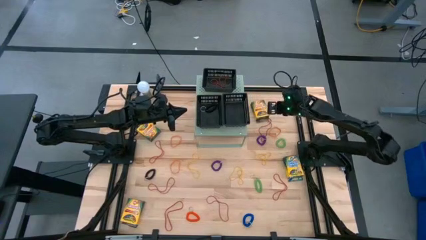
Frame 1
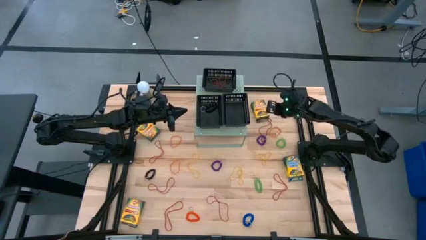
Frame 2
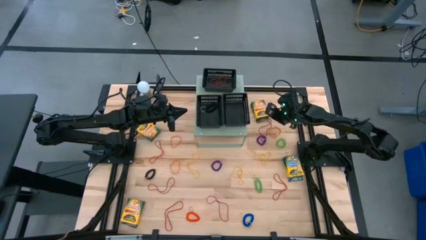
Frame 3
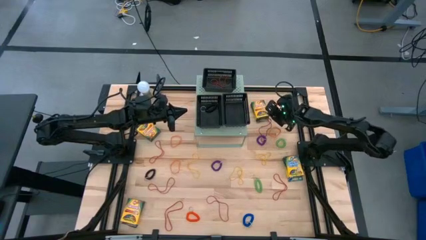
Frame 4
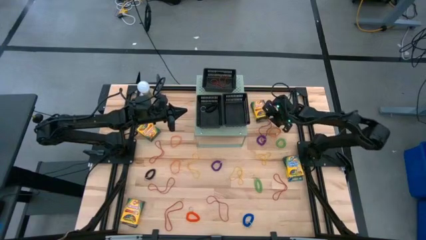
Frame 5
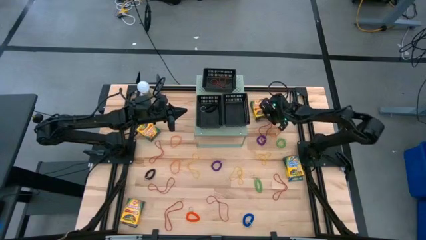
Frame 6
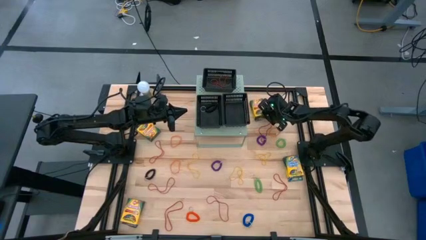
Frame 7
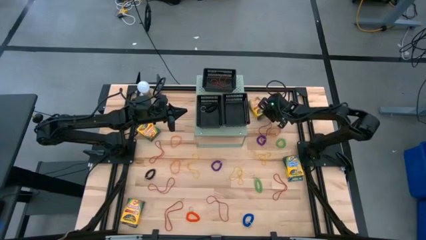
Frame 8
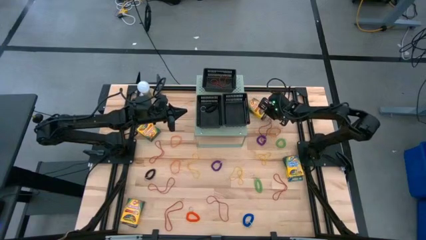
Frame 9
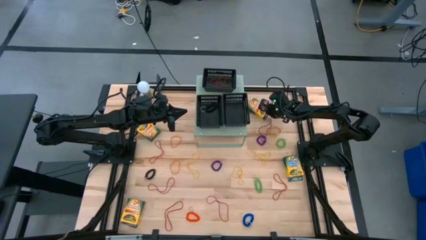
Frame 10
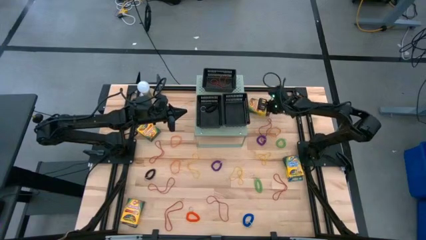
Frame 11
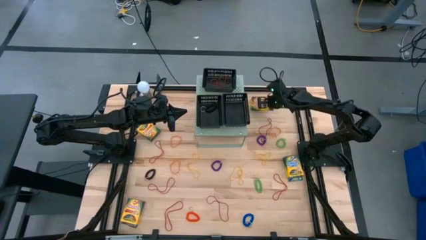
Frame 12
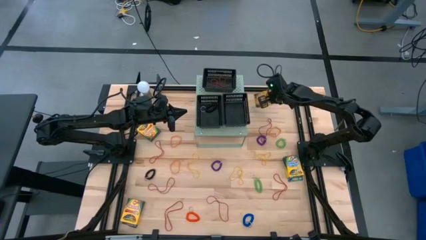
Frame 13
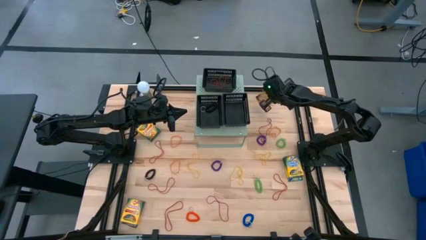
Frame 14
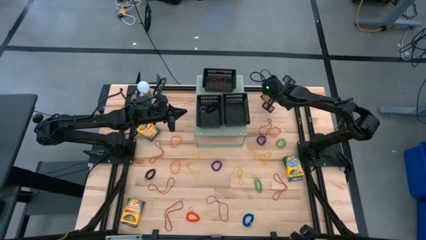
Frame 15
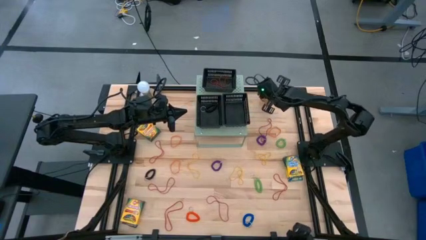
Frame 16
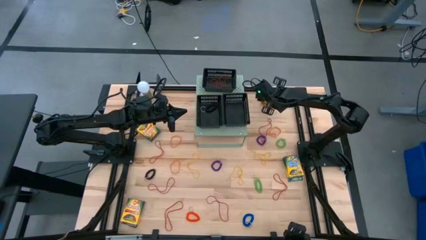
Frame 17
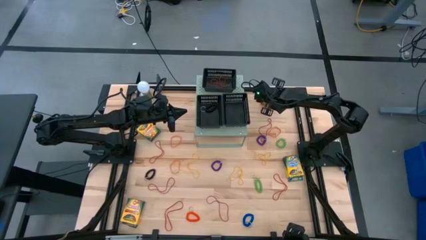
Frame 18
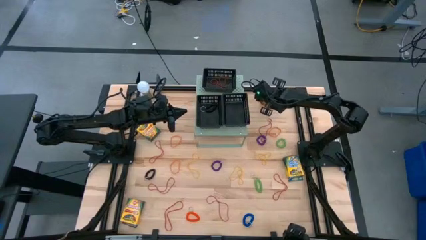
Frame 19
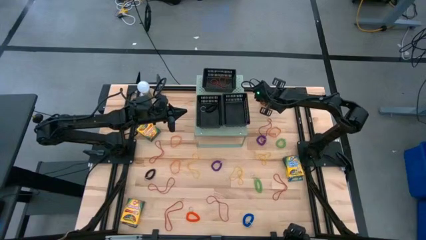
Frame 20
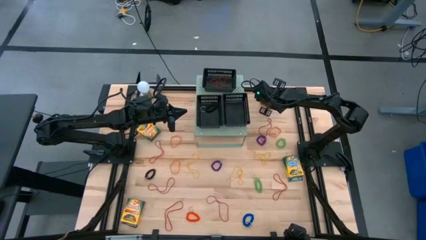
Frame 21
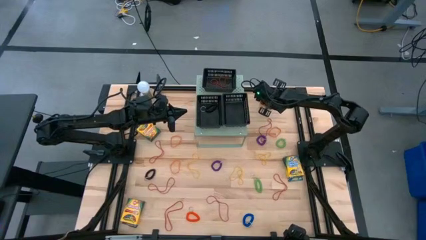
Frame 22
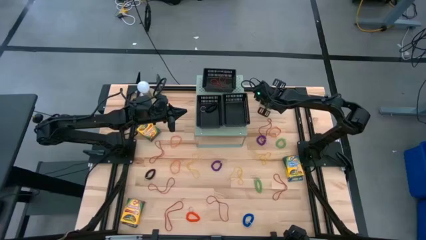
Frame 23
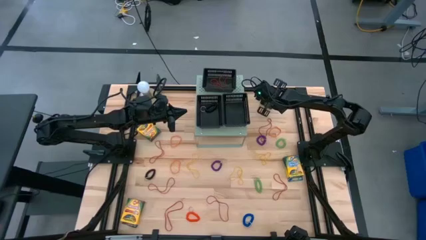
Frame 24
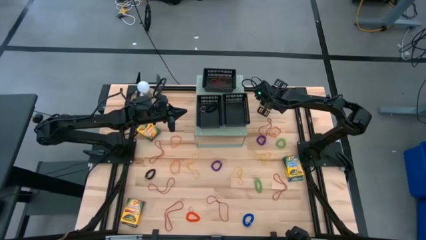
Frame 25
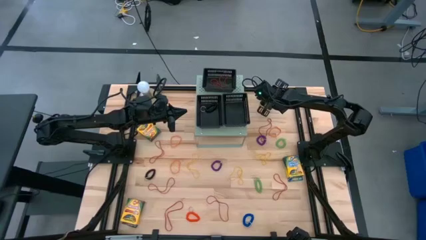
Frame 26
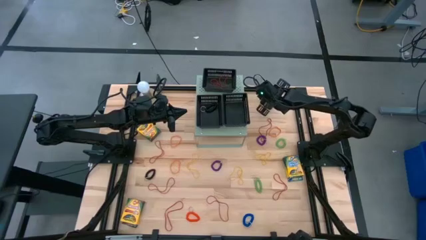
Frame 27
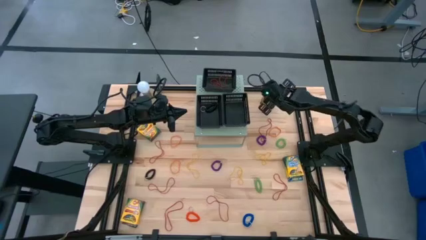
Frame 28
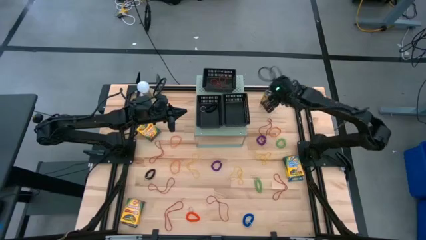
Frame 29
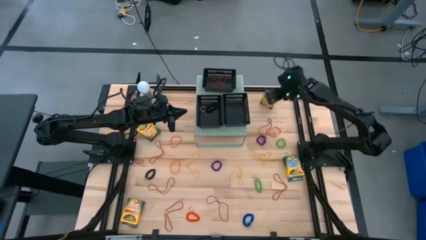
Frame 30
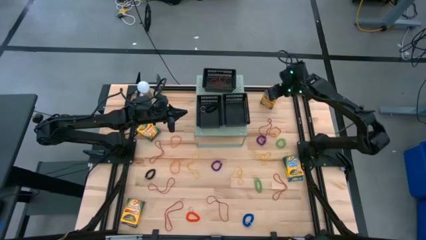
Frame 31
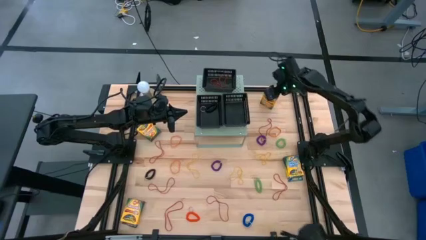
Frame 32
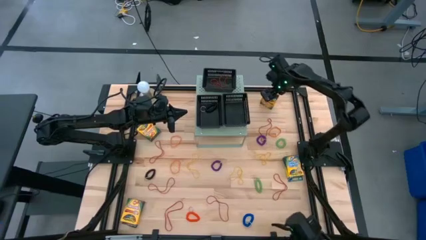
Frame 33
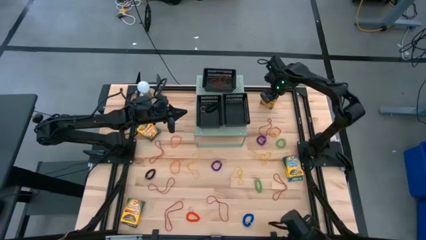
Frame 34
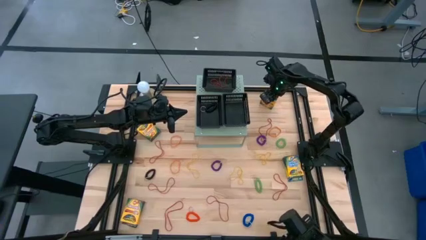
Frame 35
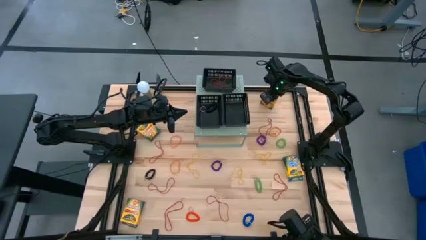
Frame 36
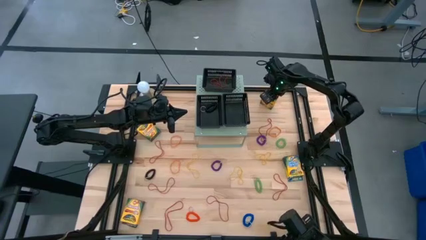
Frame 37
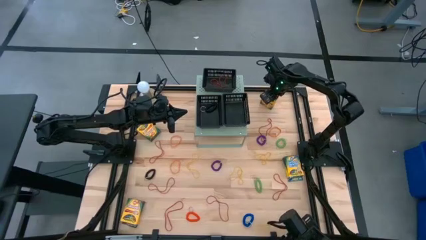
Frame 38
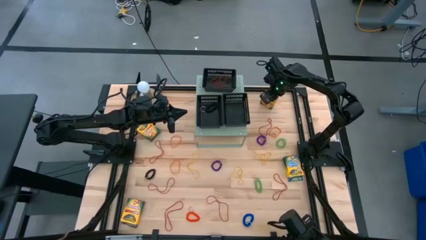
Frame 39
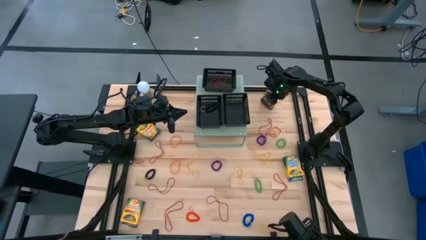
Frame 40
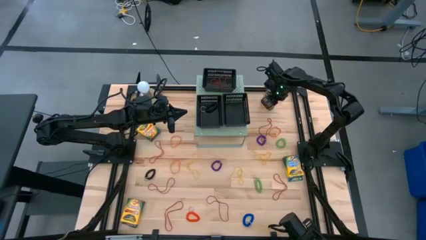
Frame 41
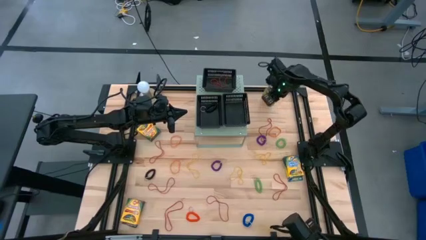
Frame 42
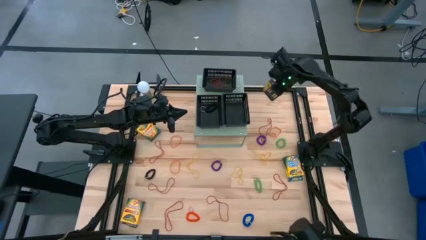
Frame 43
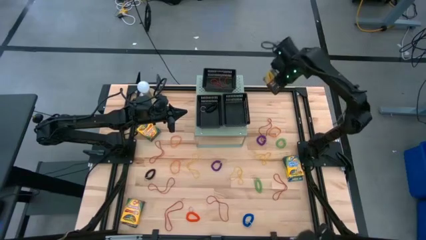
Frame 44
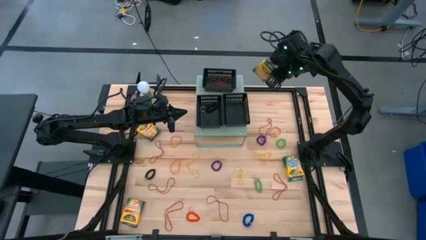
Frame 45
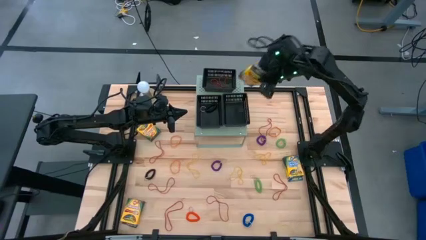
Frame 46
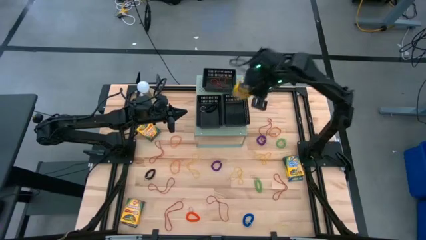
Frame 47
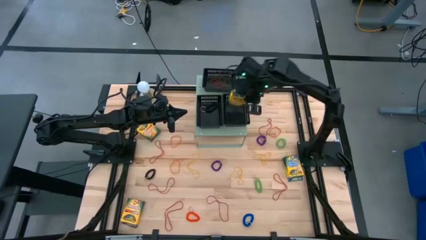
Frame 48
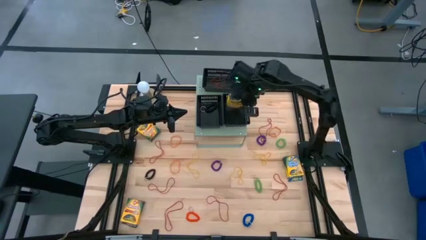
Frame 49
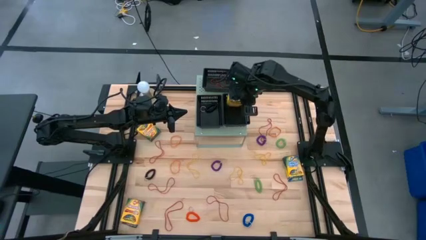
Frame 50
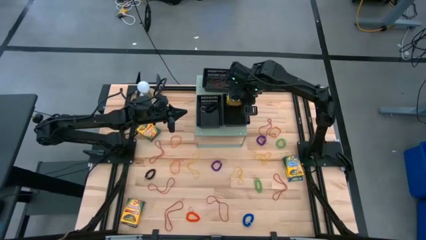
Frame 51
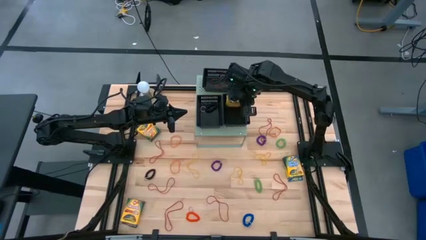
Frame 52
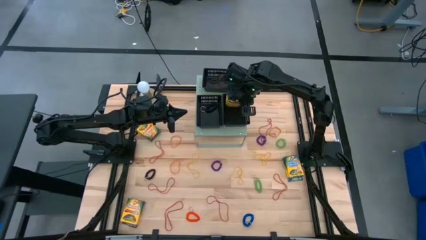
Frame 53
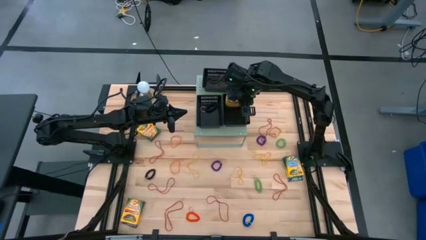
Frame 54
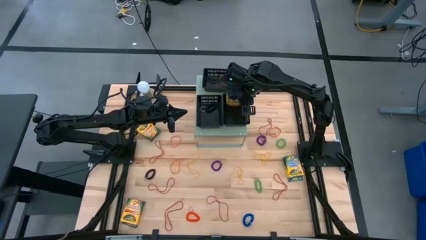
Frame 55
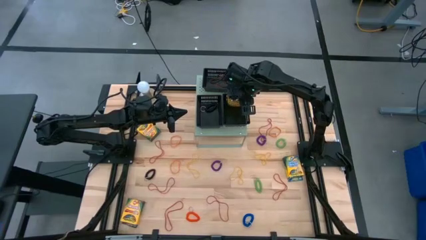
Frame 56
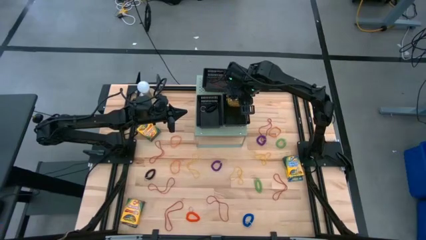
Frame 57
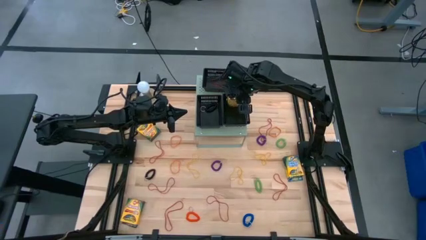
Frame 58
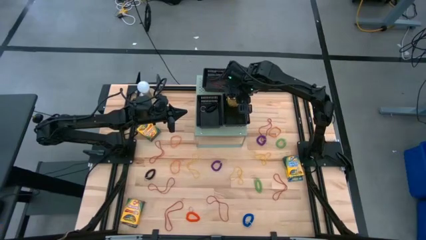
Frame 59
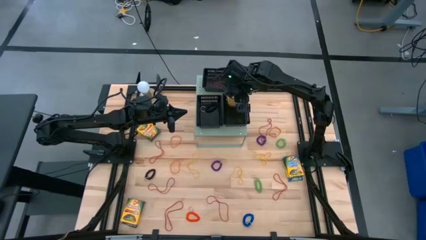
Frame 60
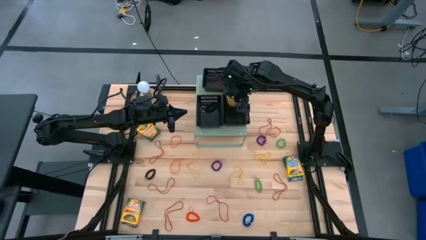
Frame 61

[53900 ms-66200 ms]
Task: Pick & Place Office Desk Supplies
Put the yellow crayon box into the bottom right black bin

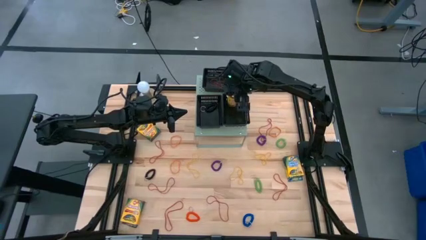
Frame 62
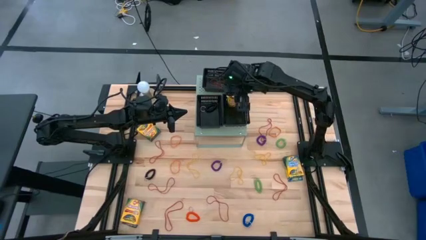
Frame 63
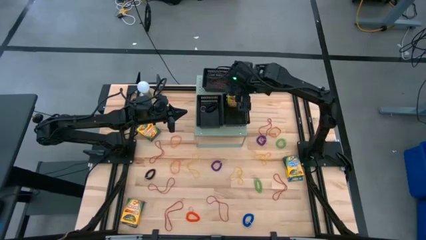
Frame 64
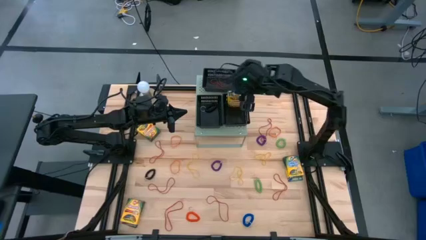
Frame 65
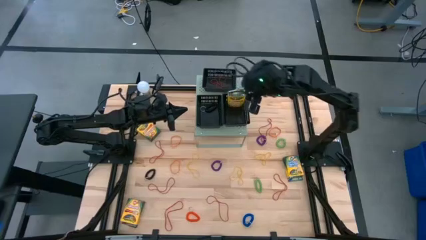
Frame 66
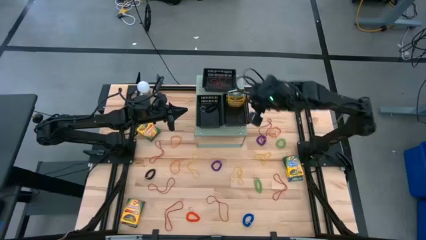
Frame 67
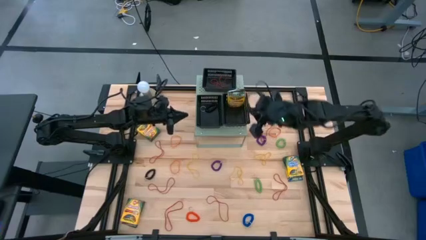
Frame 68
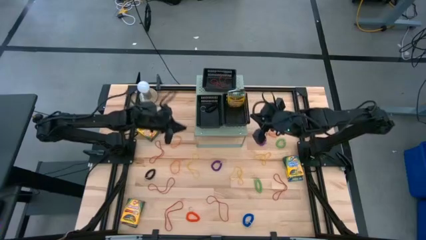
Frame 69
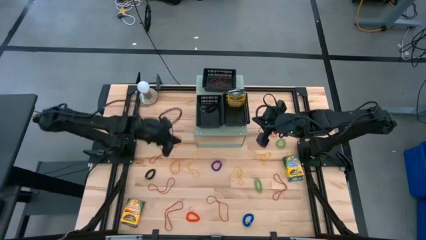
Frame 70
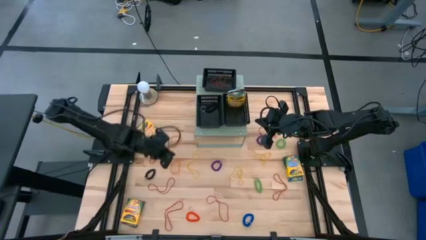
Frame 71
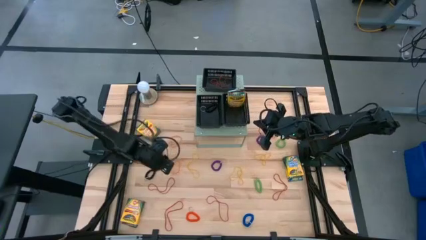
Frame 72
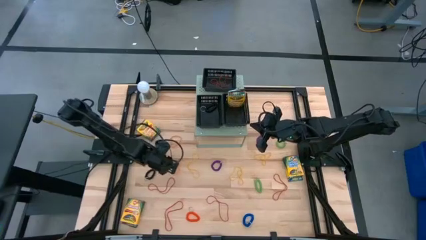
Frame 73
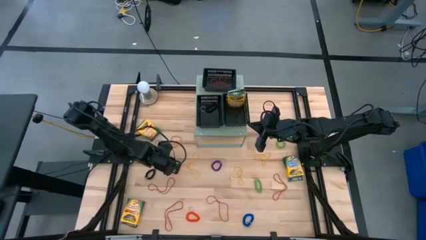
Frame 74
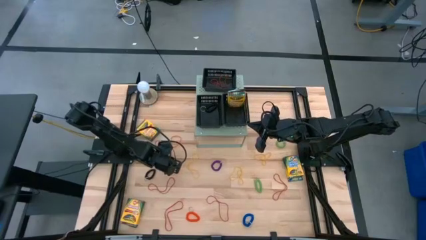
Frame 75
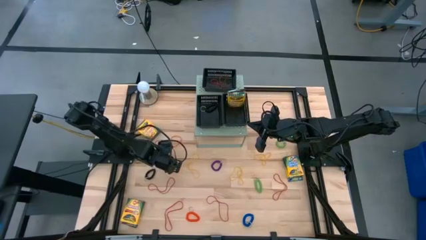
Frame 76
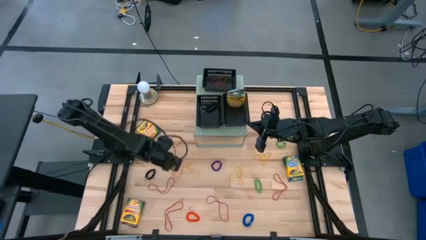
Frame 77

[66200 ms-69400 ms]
Put the orange rubber band into the top black bin

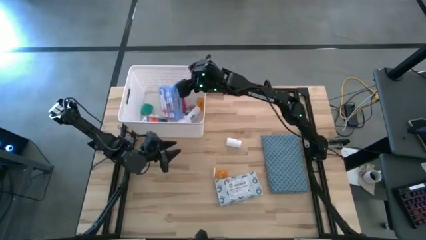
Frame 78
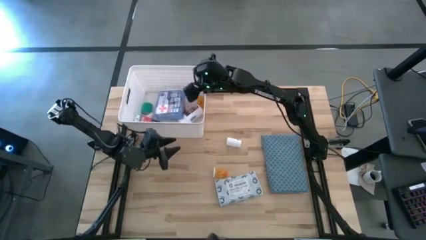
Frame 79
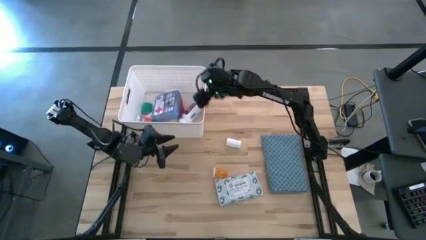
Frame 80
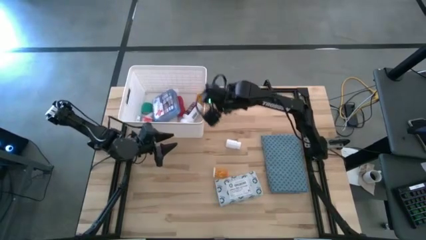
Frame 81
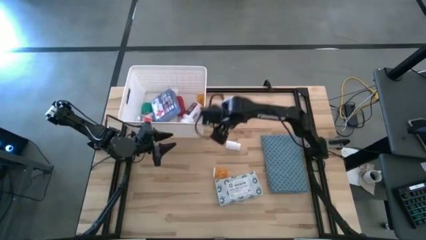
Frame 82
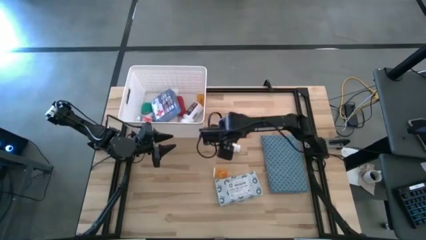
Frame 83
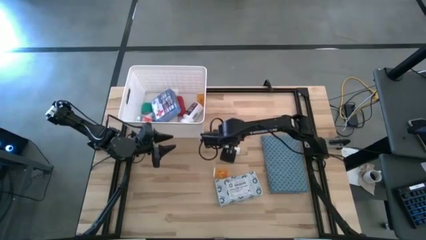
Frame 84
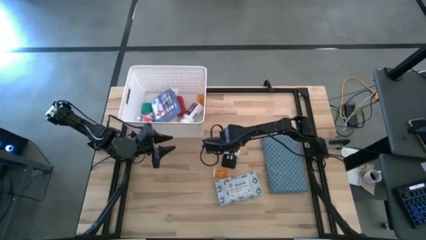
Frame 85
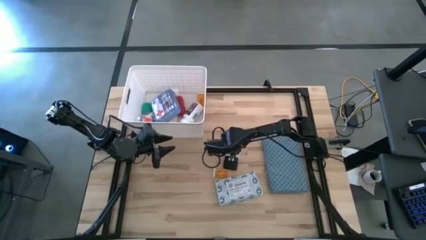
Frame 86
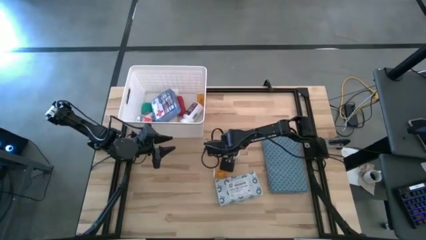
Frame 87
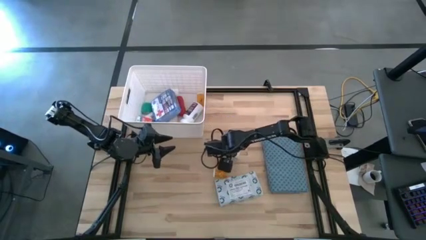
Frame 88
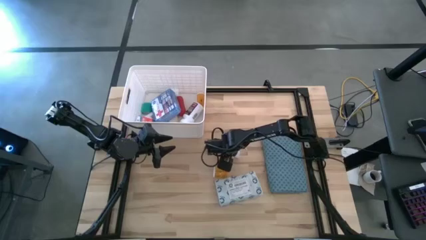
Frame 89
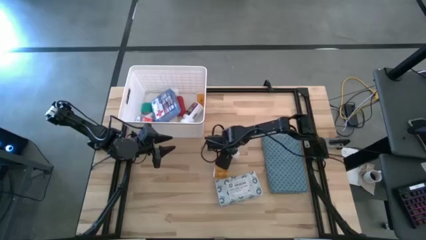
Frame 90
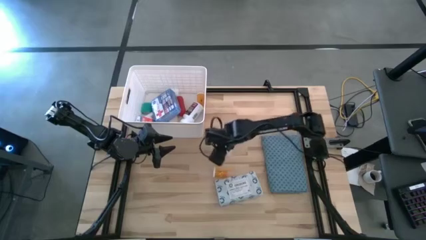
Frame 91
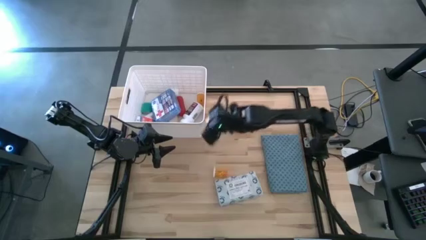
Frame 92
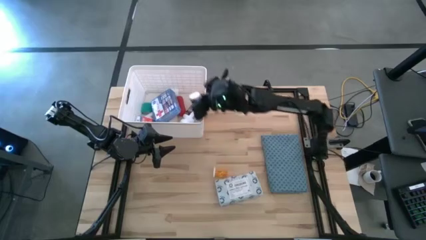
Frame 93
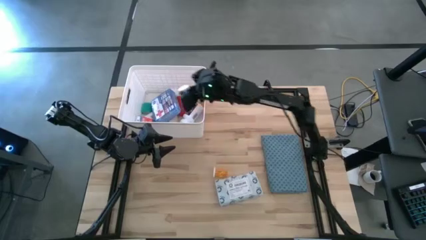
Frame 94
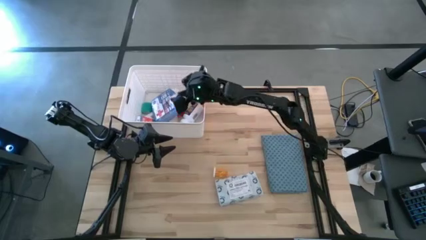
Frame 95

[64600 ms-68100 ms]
Task: Pick & place medical supplies in basket/bin
Put the white pill bottle into the white bin
